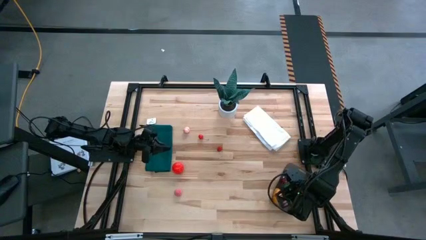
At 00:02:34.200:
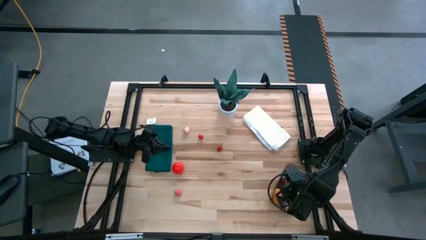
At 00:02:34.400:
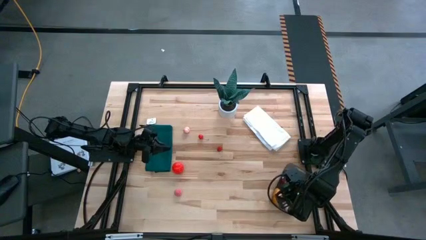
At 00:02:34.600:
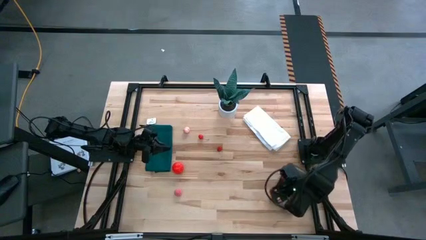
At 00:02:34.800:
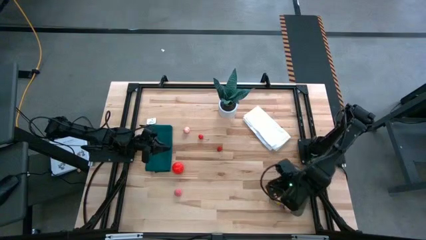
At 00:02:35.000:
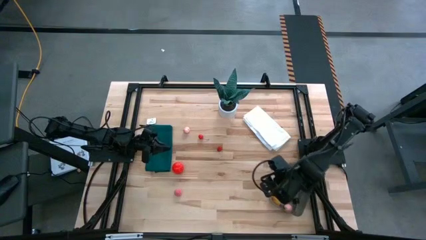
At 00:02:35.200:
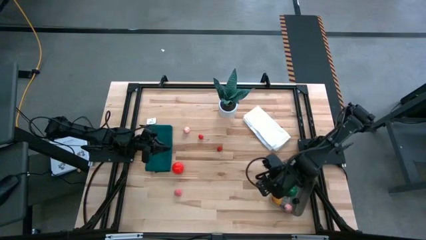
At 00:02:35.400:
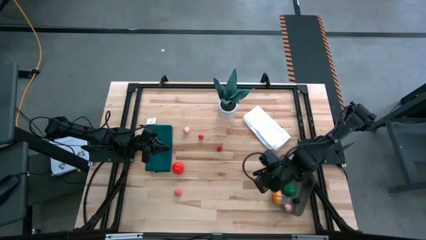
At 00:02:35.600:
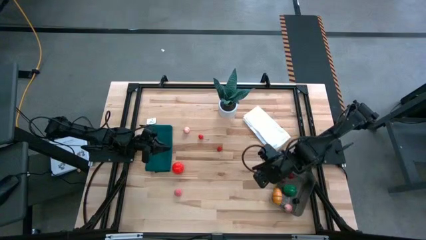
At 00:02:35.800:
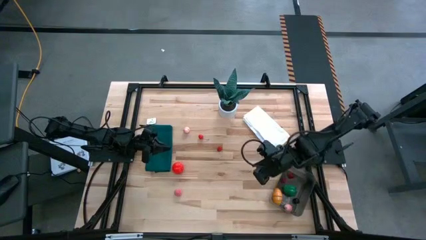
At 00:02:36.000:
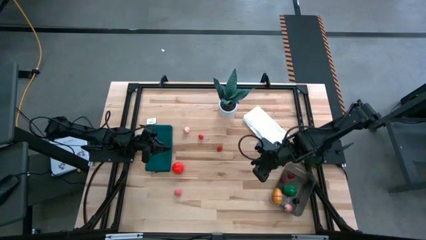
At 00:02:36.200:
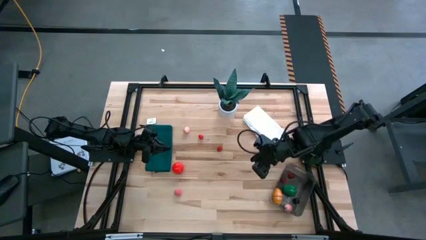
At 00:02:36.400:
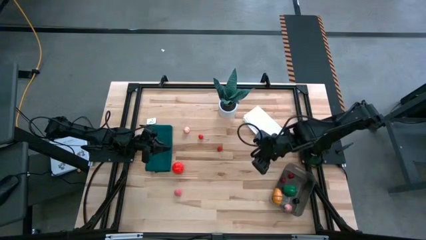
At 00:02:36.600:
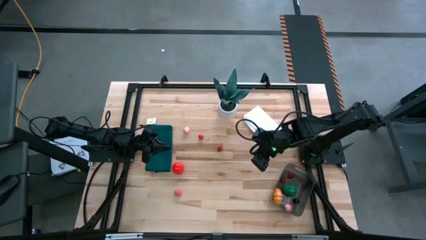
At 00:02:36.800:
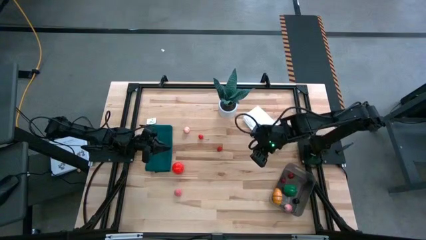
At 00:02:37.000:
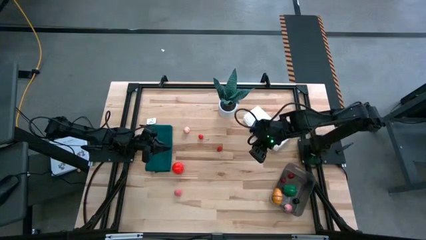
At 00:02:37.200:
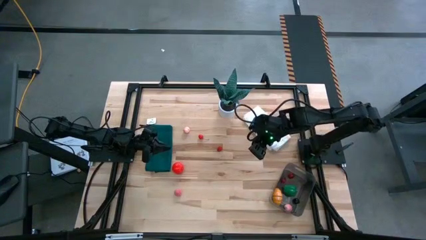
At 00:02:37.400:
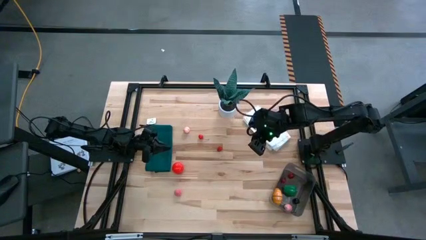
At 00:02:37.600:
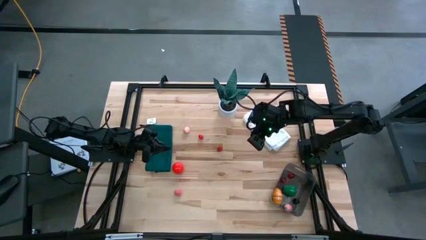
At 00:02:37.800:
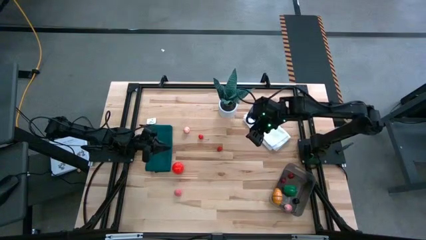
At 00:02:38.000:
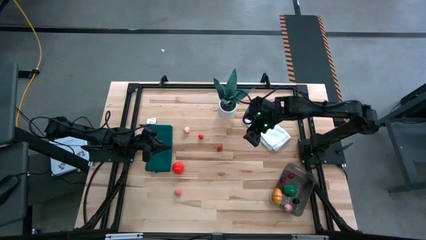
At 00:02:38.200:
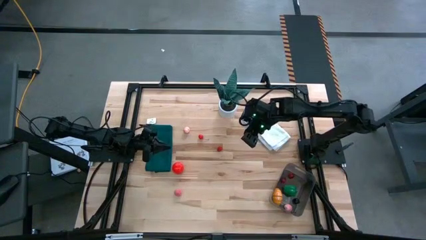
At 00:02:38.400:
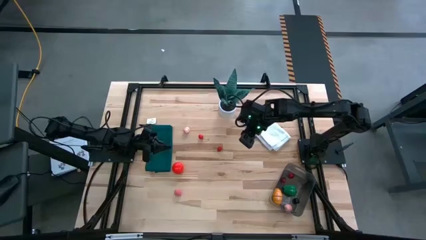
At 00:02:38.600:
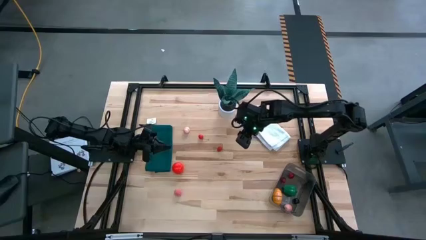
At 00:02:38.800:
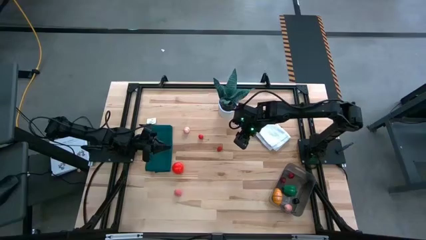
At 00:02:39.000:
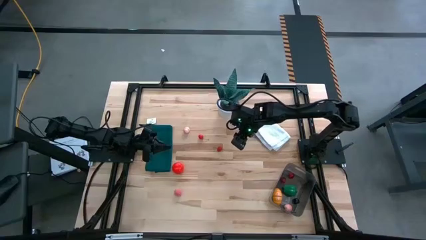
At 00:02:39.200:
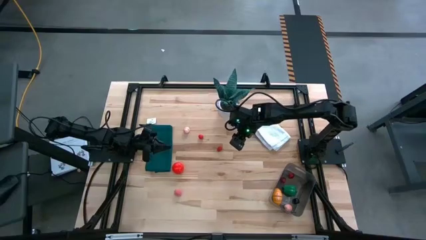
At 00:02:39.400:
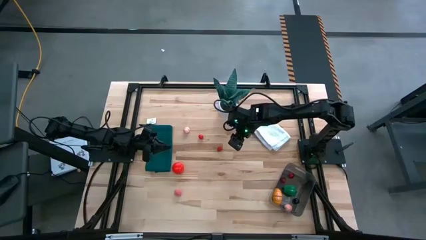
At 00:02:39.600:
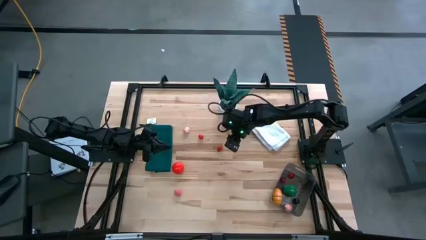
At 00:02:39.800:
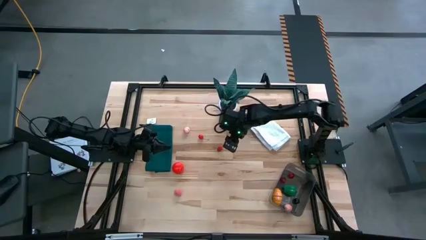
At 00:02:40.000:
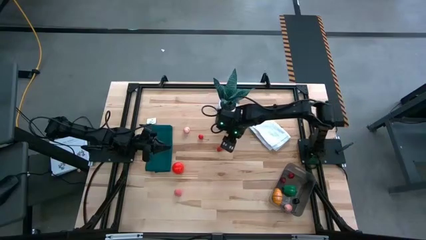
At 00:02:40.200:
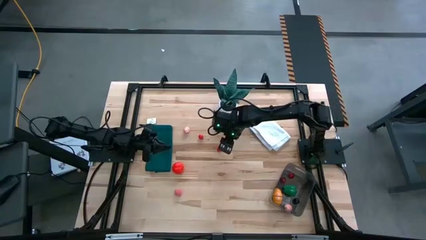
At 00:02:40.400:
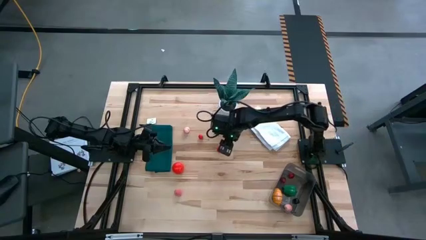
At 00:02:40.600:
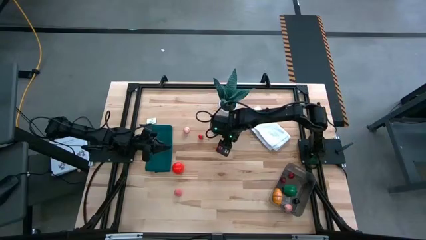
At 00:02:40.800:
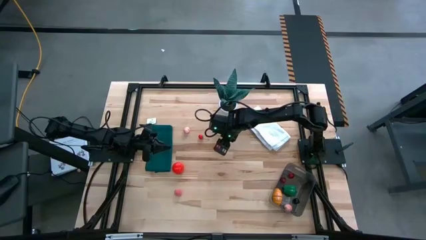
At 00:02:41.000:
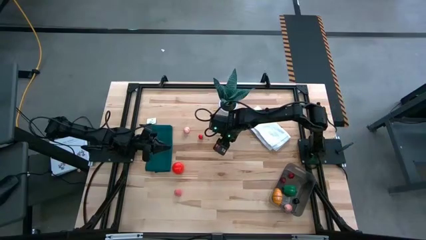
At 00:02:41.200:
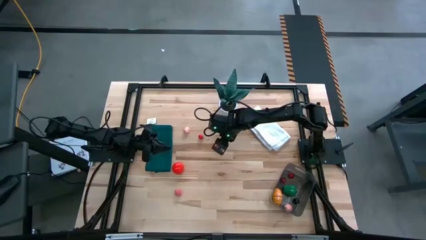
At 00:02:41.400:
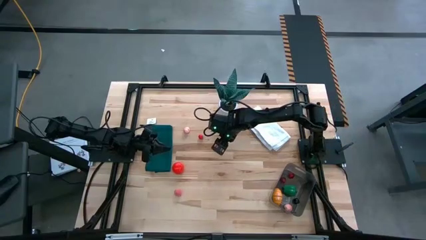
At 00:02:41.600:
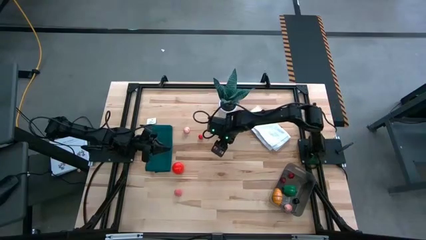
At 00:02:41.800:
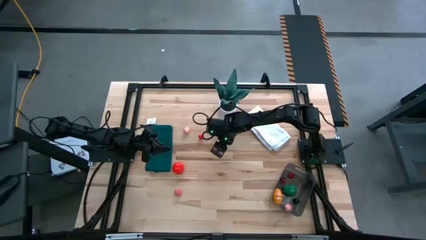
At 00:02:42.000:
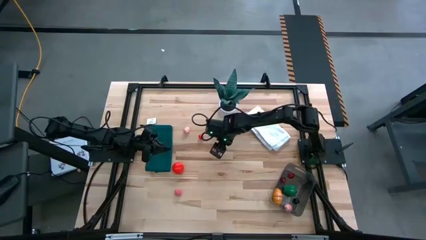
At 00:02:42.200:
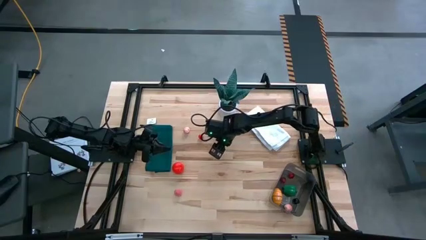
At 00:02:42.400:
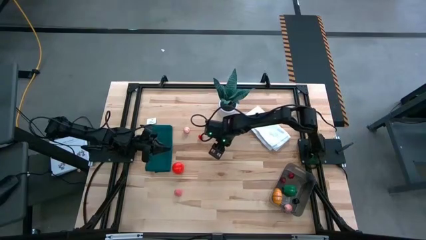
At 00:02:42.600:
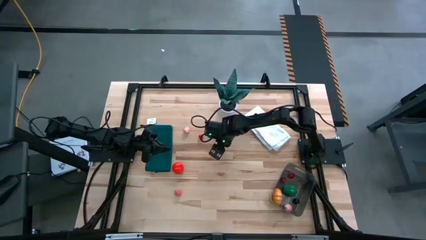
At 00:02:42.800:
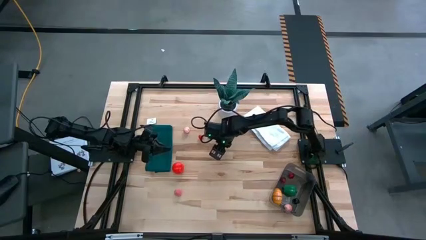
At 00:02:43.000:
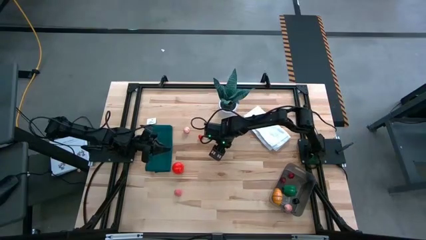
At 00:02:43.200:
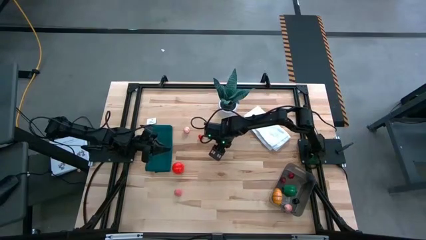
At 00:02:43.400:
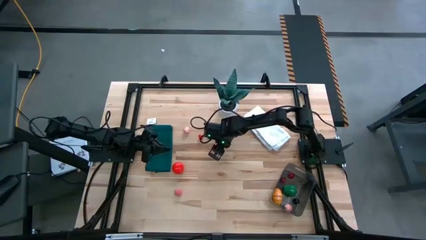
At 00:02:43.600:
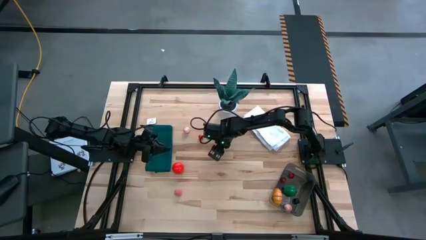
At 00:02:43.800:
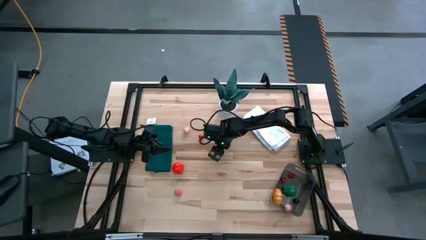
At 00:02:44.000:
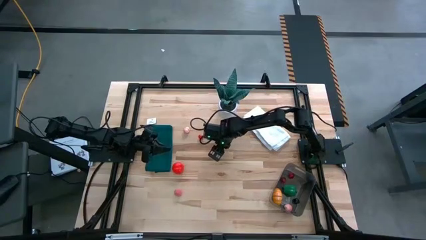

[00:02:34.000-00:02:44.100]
Task: Pick and placing Produce into tupperware
Put the red raspberry into the black bin

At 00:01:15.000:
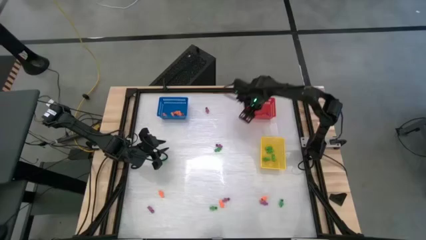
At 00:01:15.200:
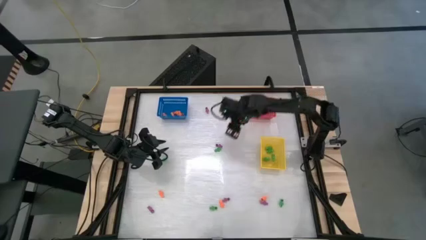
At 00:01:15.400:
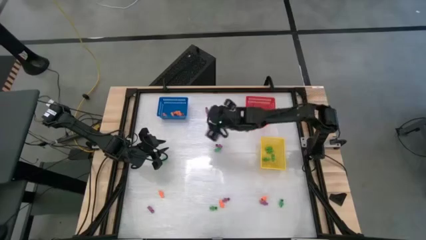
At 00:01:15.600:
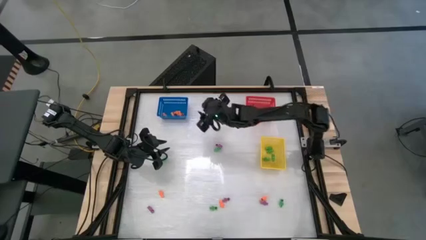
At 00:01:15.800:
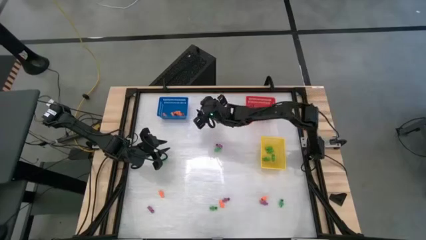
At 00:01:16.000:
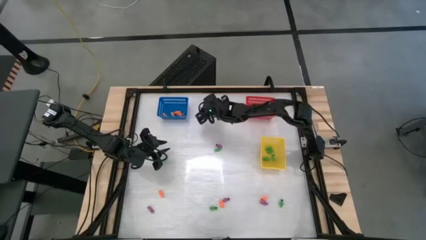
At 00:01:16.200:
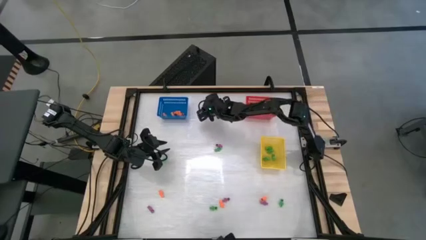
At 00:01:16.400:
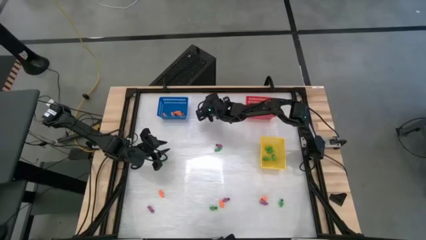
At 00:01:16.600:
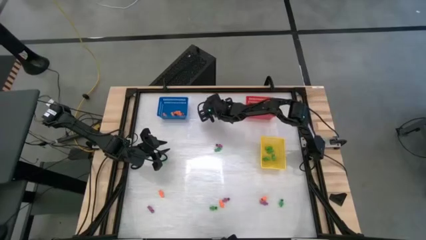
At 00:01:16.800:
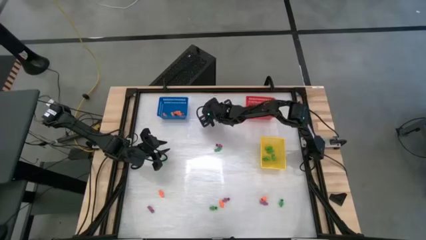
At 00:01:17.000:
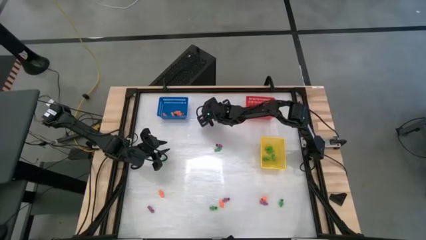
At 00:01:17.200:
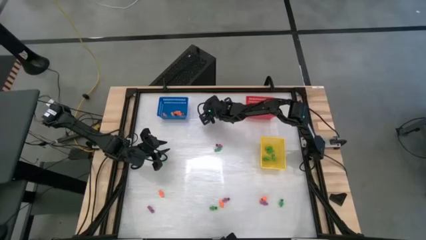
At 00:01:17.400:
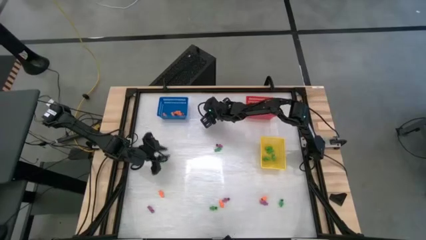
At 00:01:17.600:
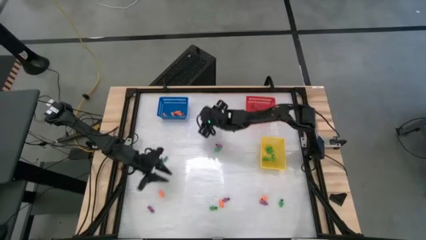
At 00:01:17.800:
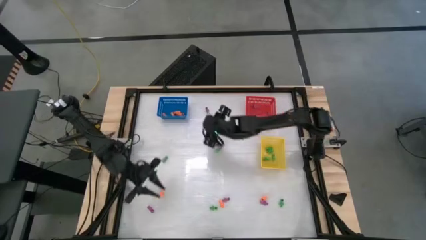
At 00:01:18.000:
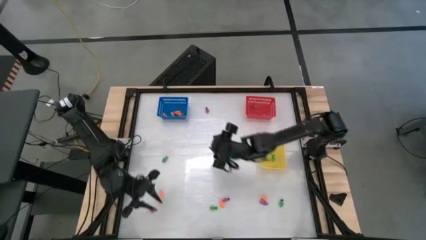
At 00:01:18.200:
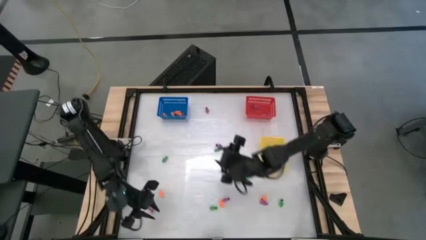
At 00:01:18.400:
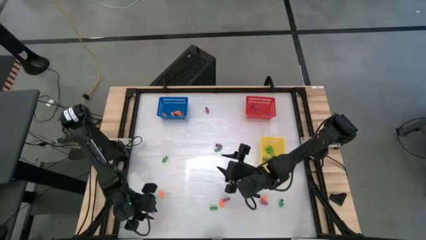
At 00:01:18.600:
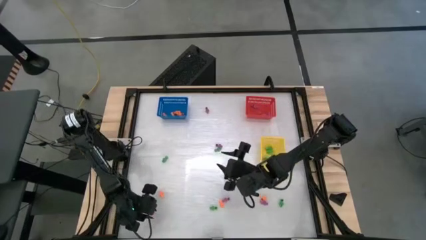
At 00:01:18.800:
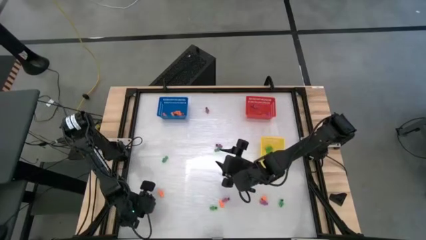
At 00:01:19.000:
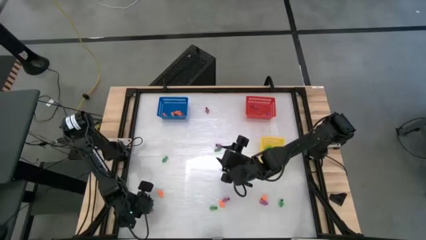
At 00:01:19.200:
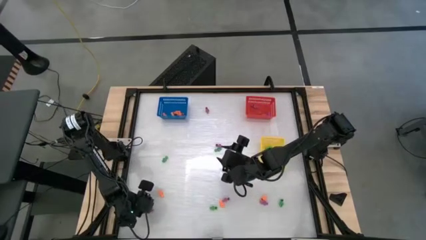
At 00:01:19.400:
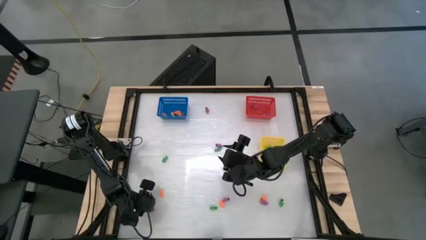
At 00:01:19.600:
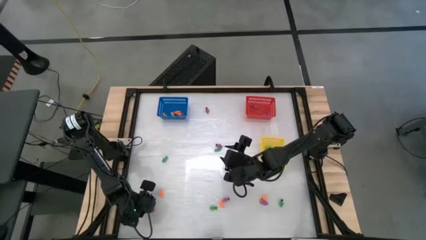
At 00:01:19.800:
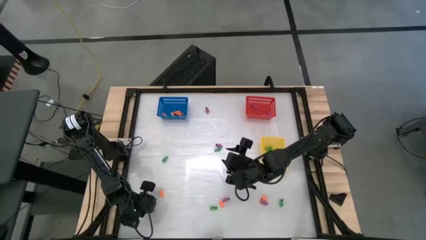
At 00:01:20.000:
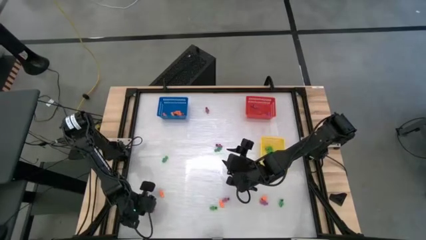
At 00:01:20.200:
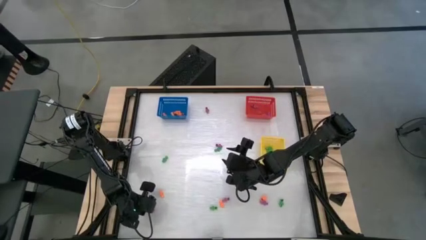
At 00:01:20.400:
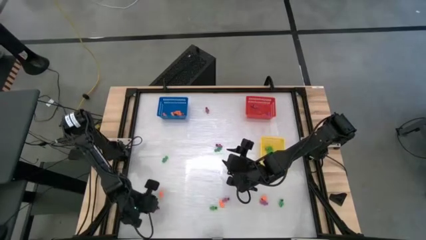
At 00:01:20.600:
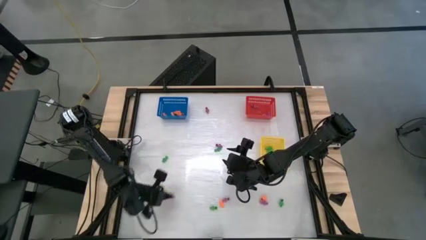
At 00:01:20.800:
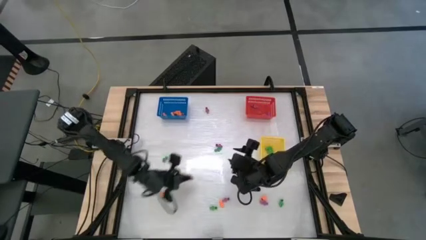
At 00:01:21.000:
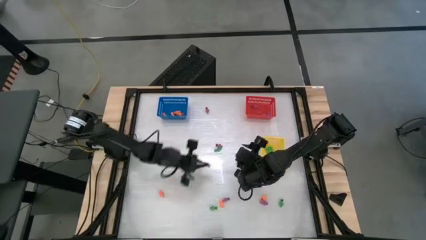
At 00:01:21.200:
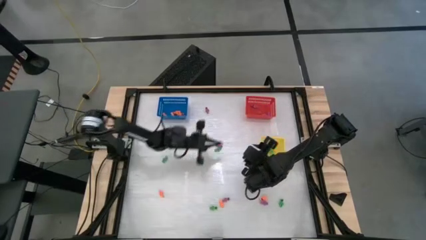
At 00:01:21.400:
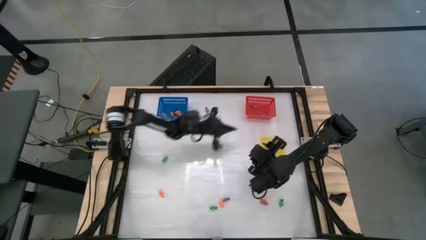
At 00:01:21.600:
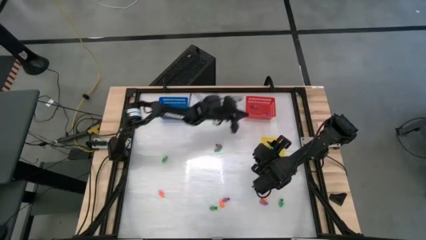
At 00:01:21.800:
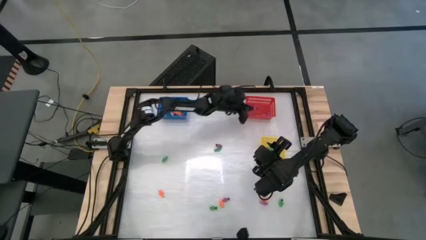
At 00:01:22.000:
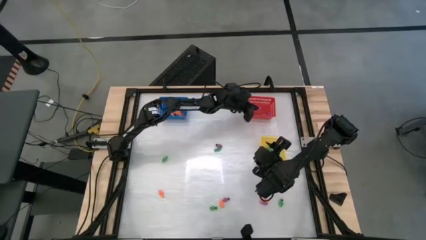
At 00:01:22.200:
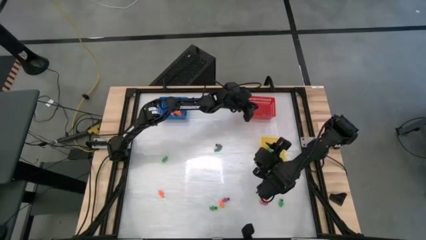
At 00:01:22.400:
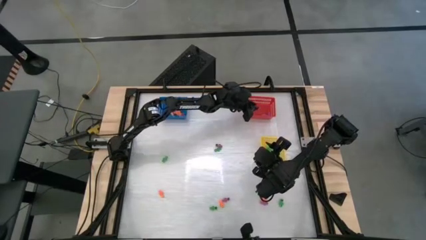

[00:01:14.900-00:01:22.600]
Task: Sort Halloween decoration
Put the purple skeleton toy into the red bin
